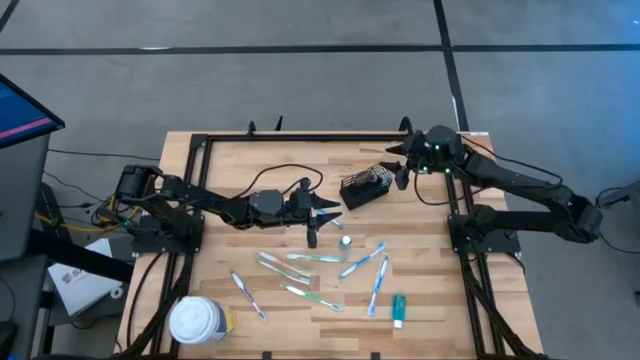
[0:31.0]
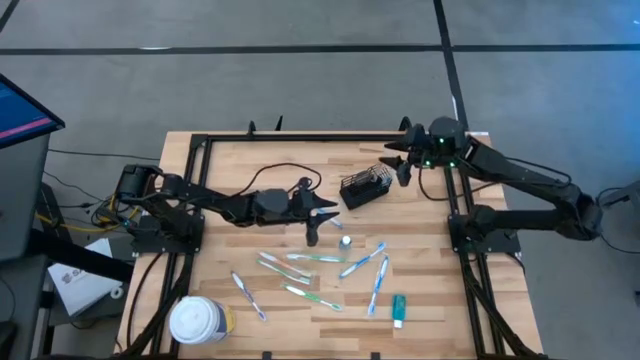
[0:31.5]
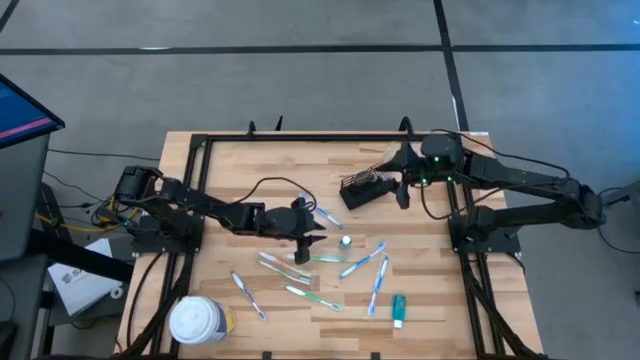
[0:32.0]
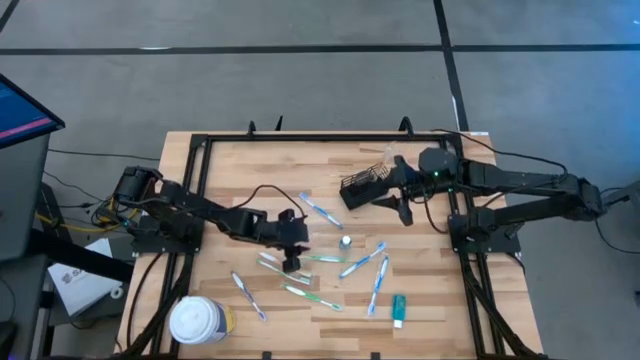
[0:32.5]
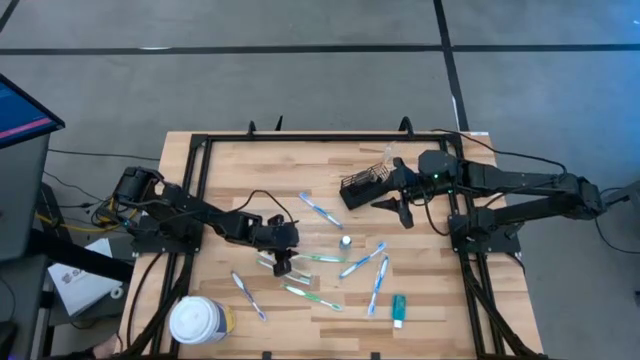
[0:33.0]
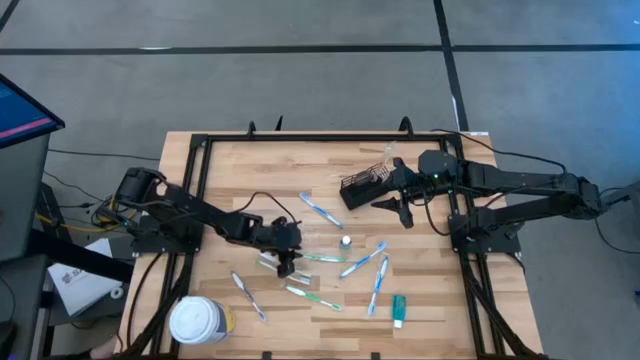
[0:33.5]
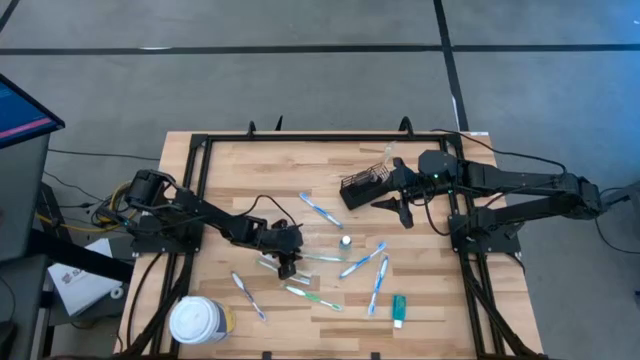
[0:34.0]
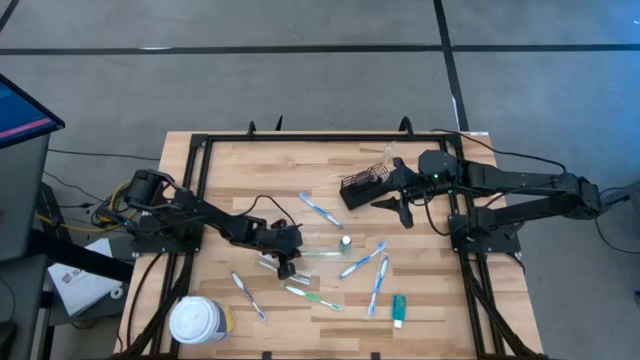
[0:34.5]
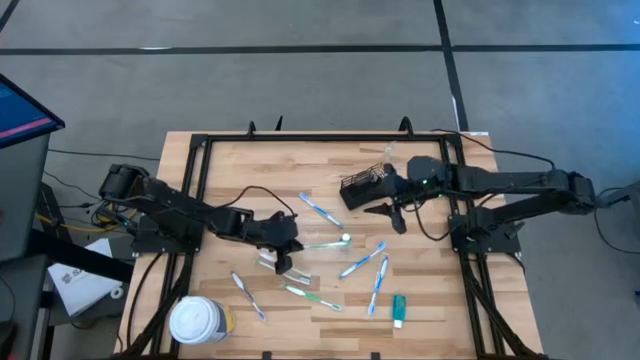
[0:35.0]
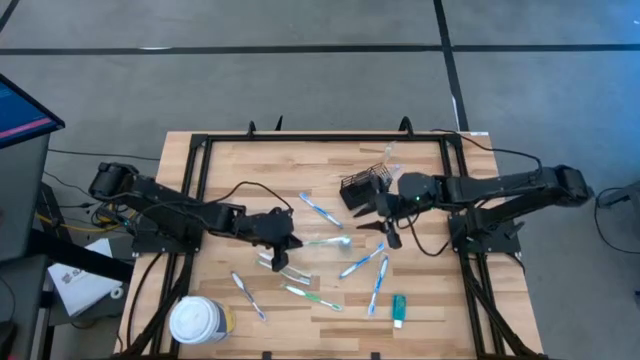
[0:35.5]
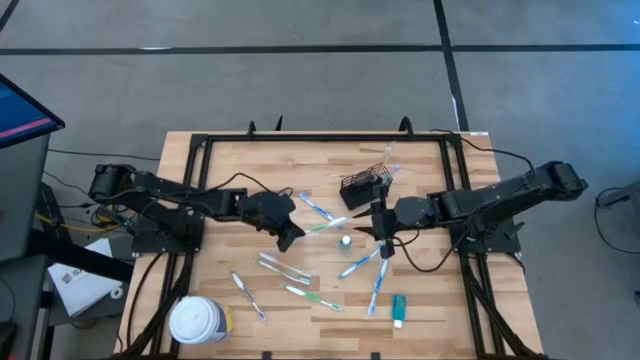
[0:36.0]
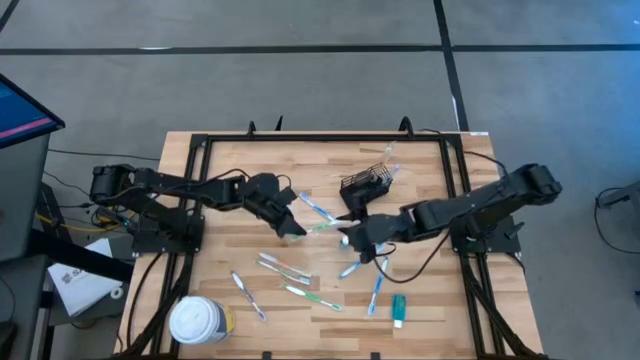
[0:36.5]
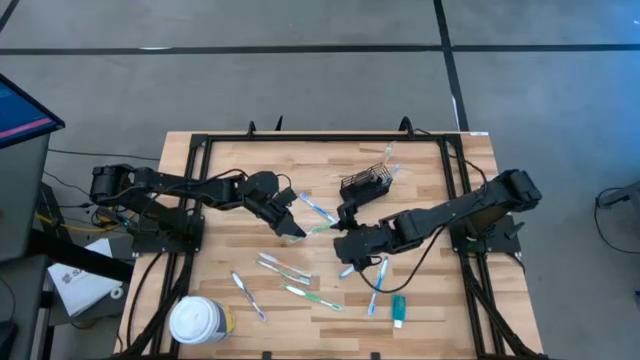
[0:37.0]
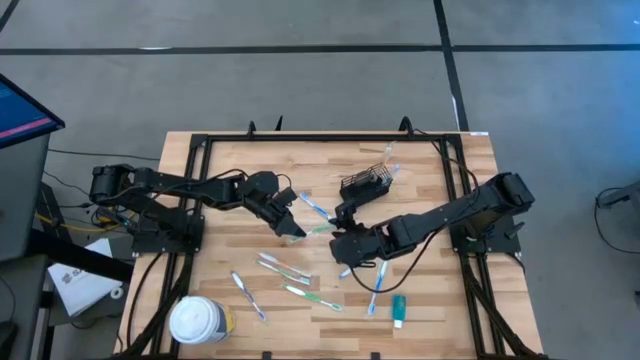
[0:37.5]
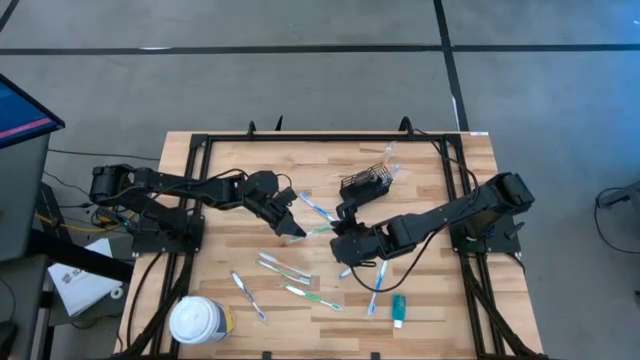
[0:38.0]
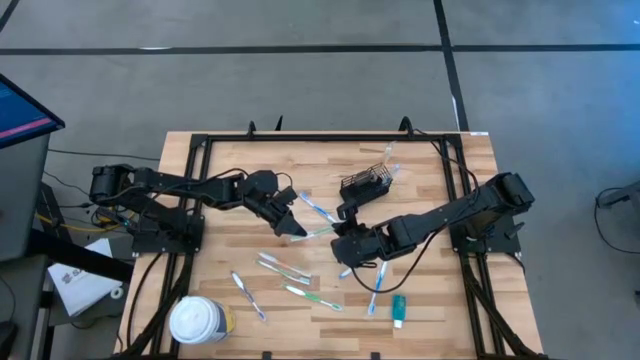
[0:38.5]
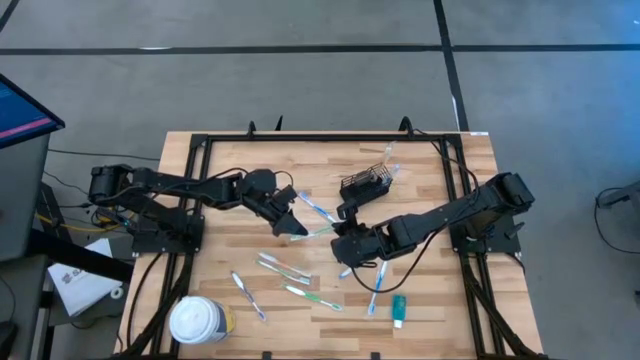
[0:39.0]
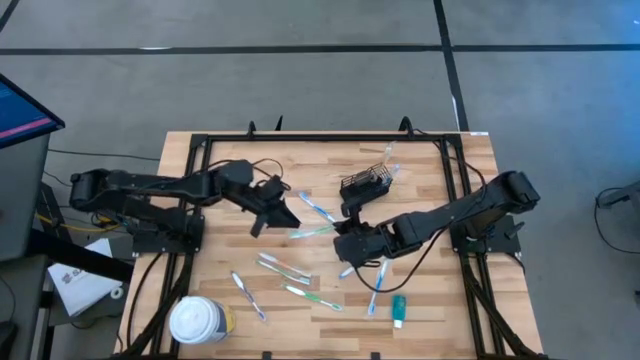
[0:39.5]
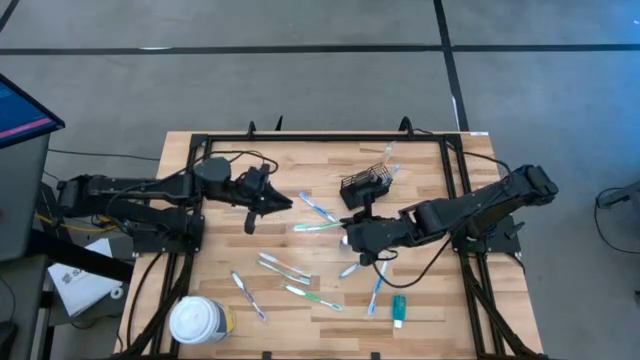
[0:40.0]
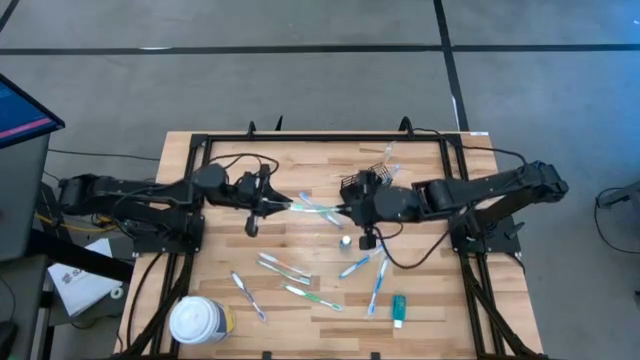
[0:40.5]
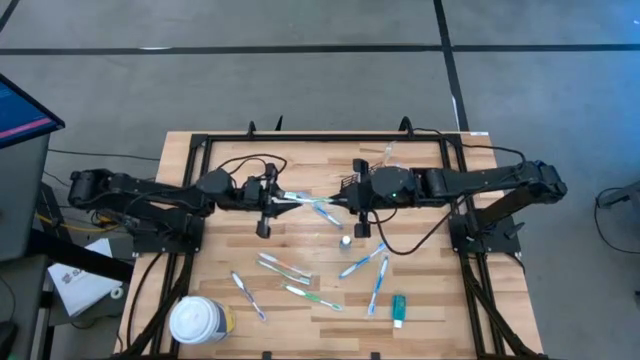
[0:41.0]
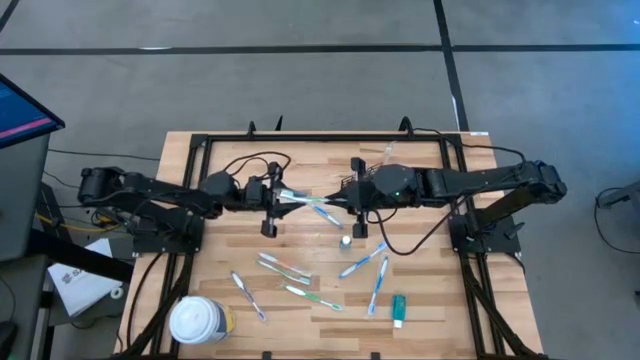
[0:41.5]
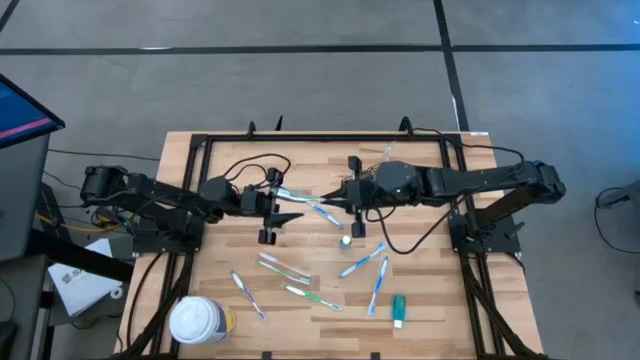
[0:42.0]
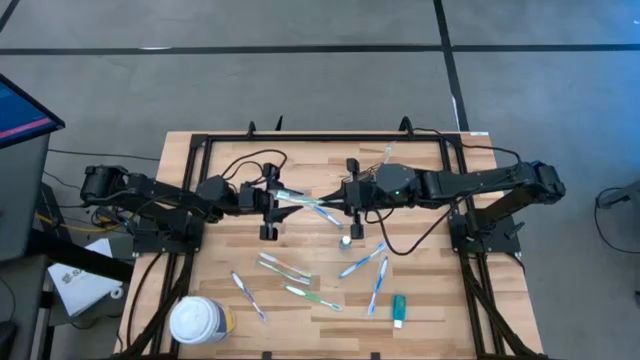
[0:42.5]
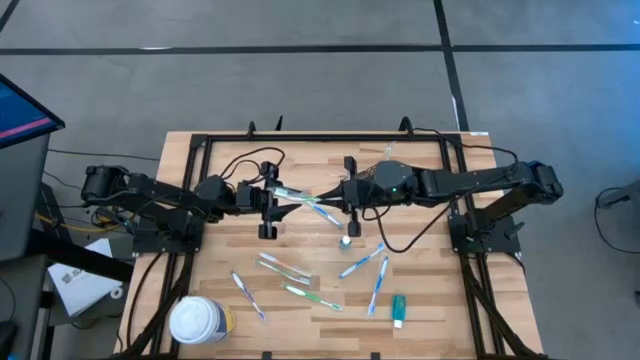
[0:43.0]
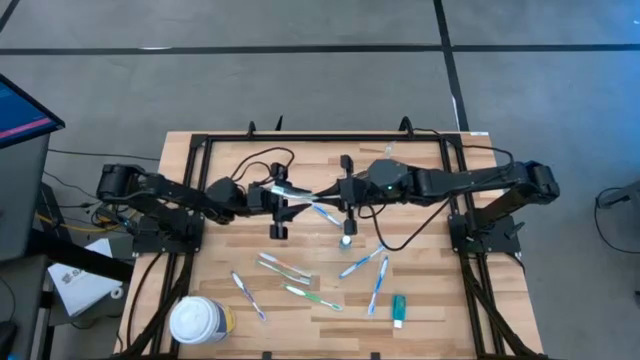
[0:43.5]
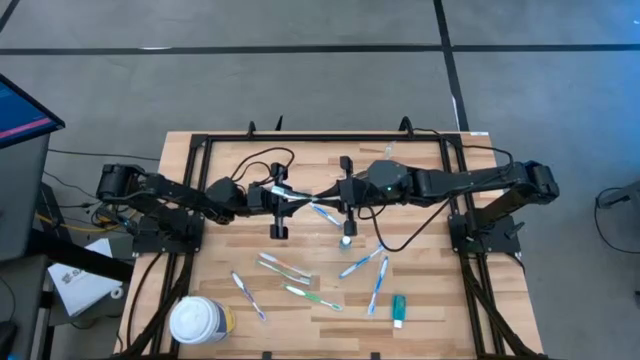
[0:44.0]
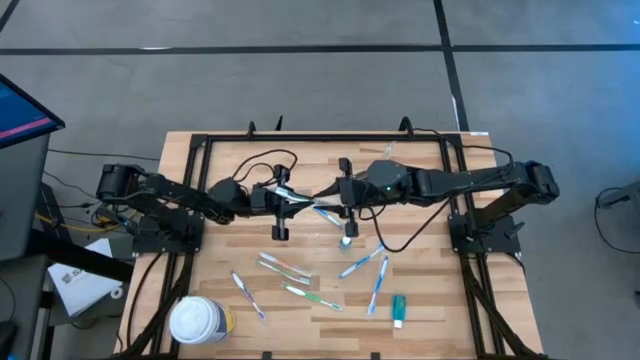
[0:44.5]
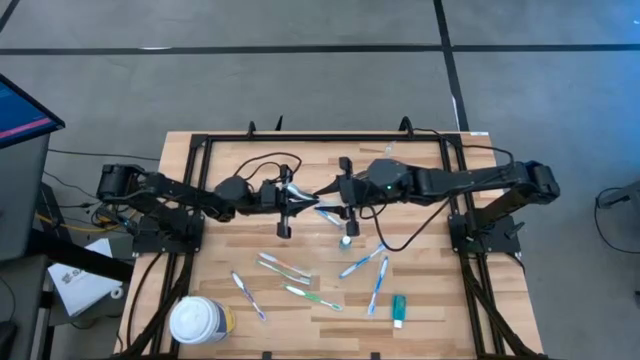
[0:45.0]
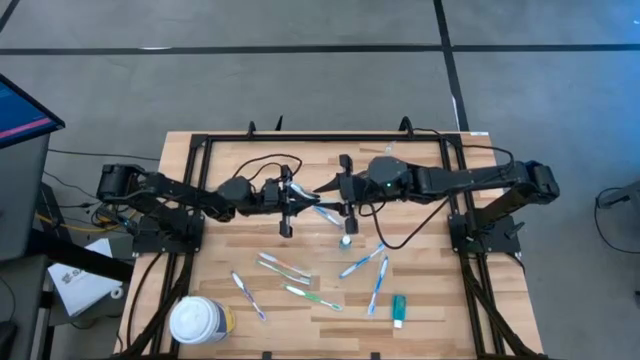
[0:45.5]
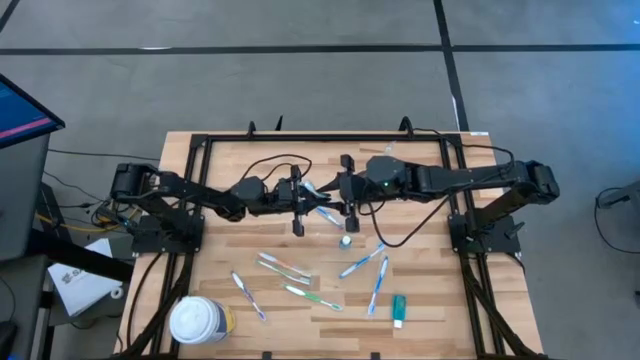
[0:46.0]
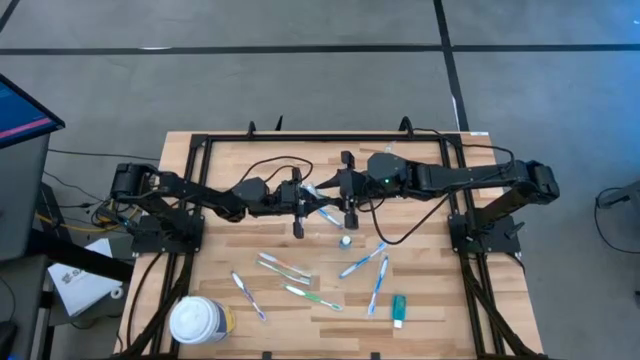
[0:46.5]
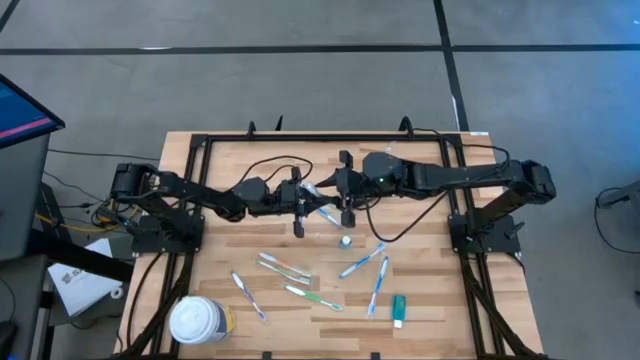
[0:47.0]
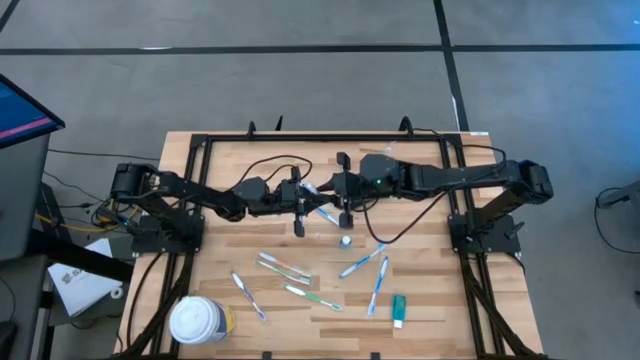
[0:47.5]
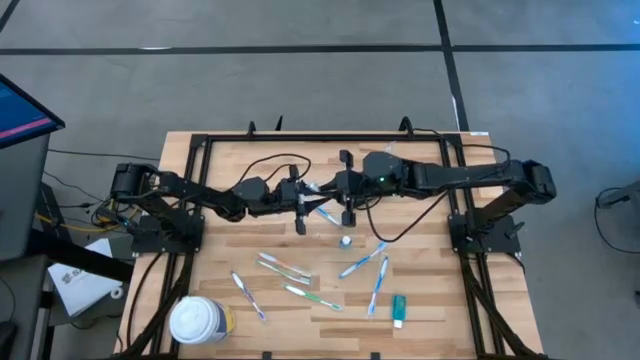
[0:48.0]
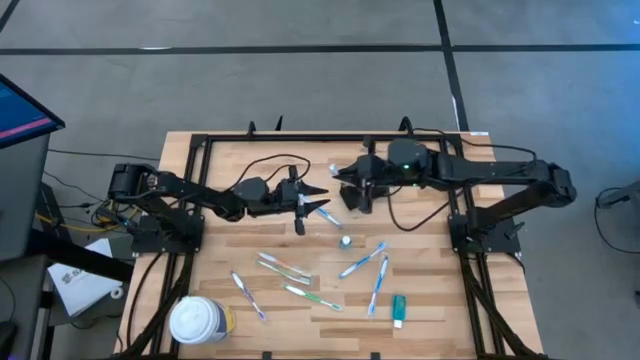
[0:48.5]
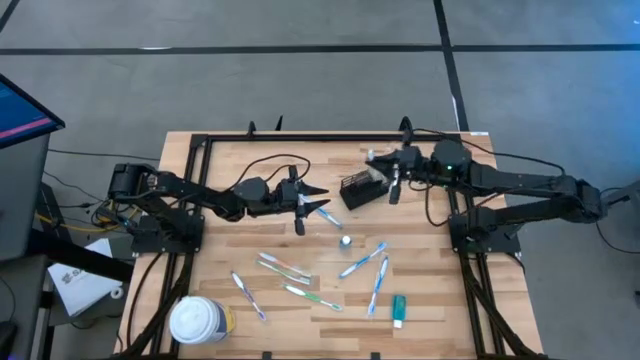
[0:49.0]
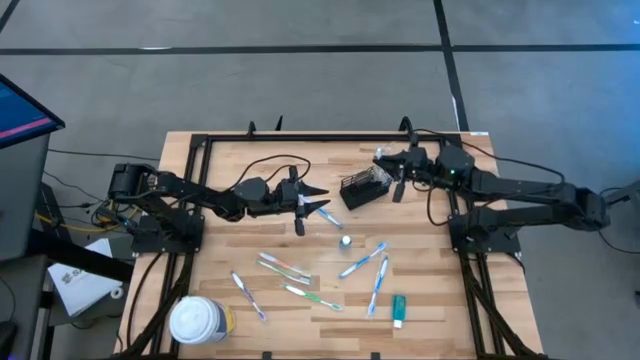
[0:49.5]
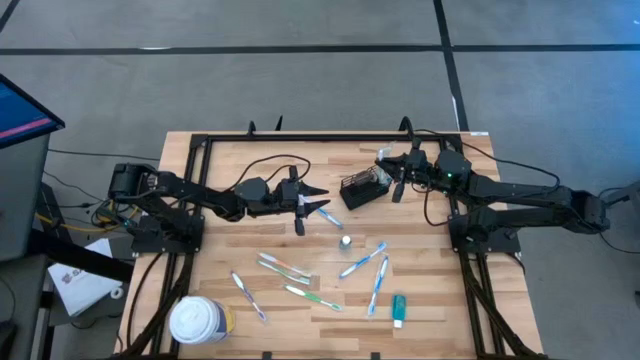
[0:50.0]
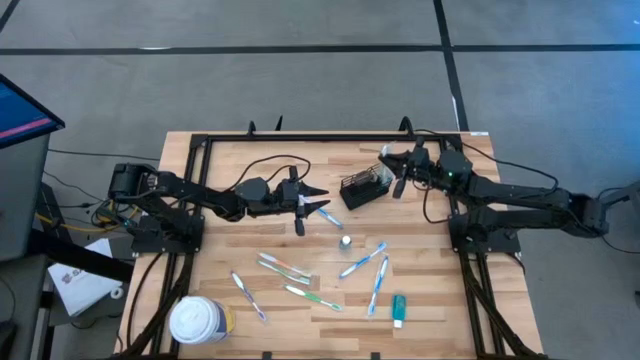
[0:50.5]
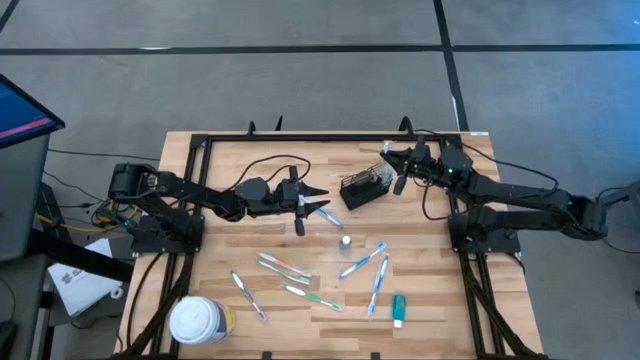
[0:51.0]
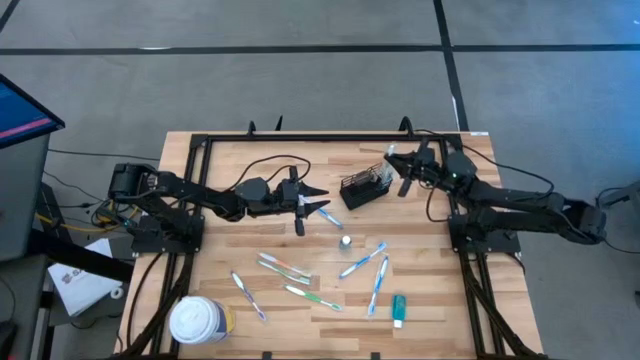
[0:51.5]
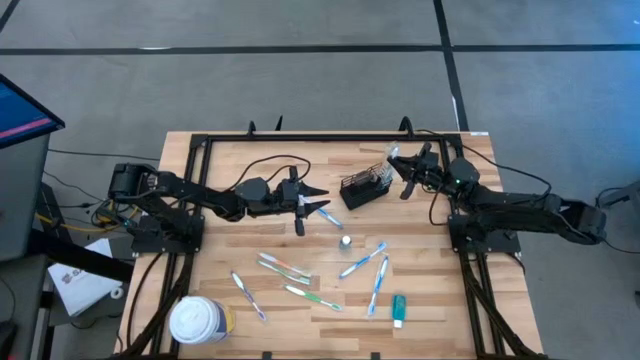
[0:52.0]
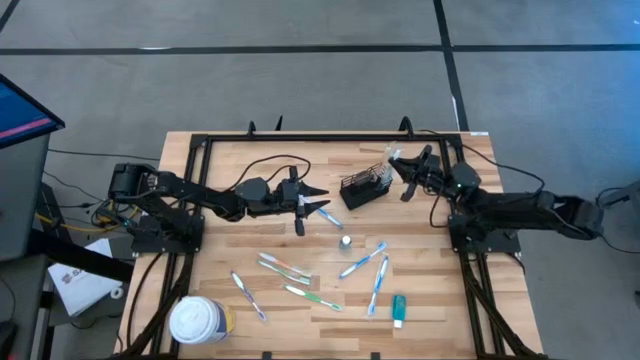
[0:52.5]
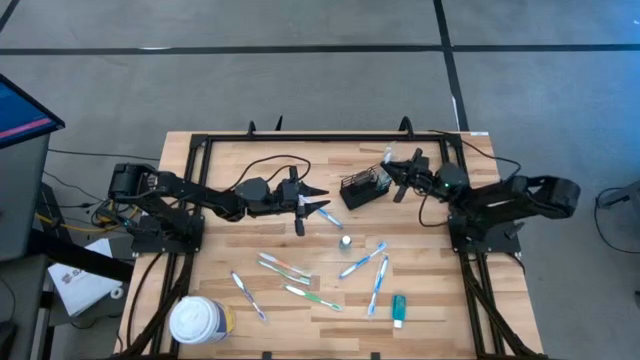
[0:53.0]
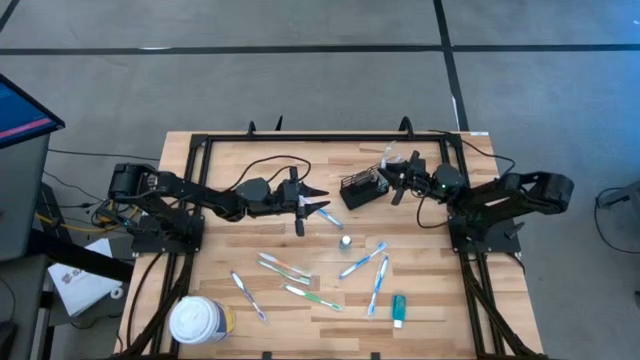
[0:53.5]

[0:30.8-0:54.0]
Task: Pick & Place toothbrushing station
Put the green toothbrush into the mesh organizer
